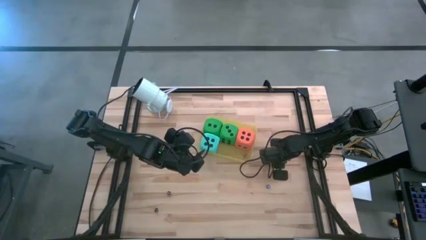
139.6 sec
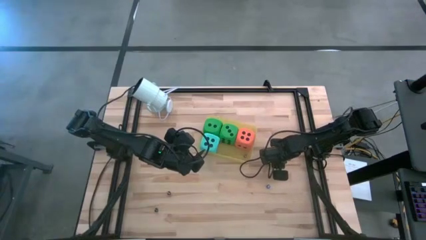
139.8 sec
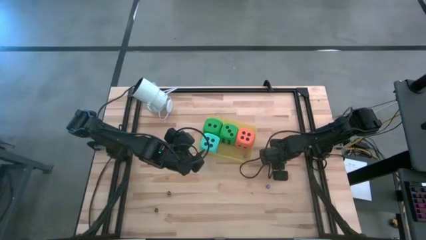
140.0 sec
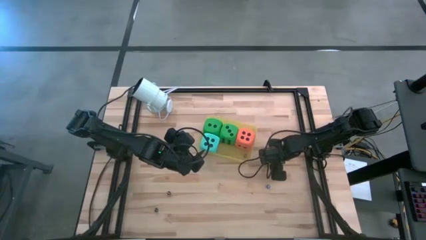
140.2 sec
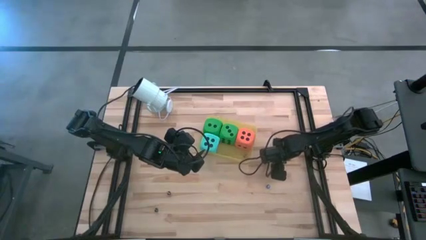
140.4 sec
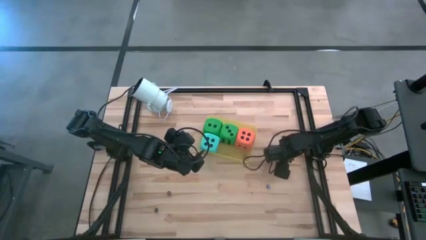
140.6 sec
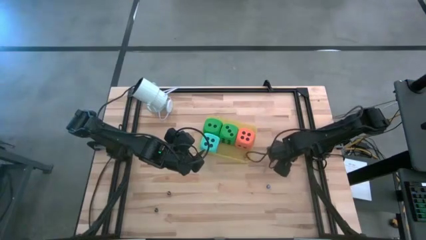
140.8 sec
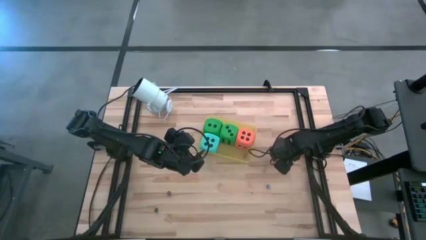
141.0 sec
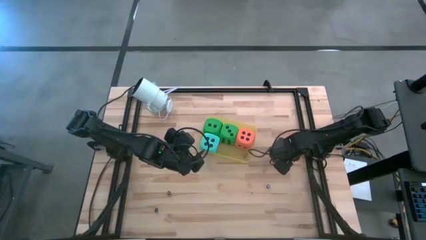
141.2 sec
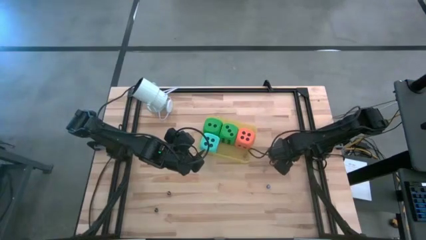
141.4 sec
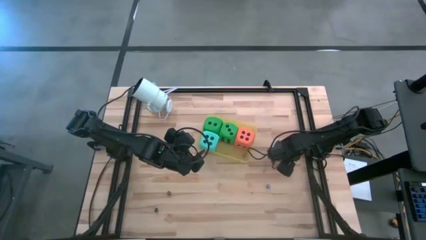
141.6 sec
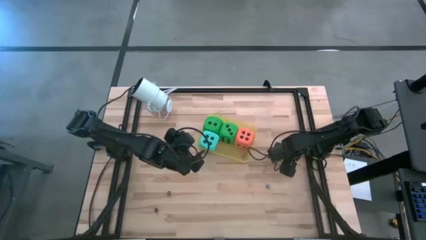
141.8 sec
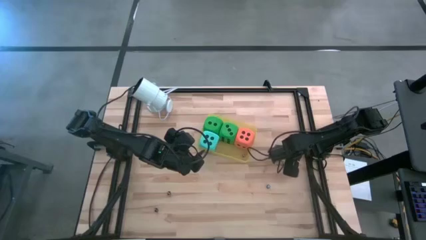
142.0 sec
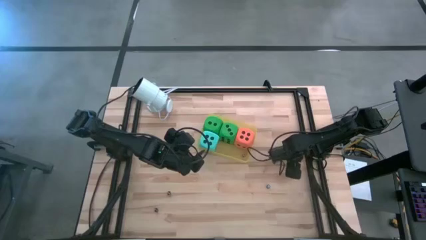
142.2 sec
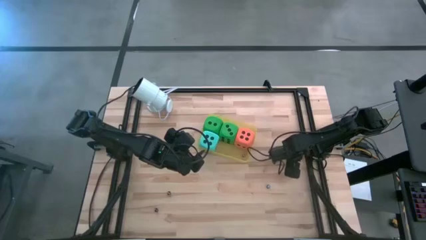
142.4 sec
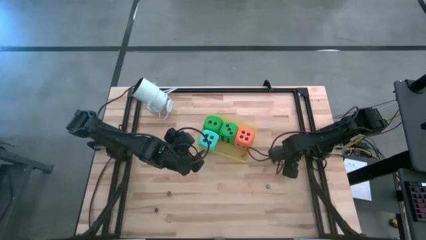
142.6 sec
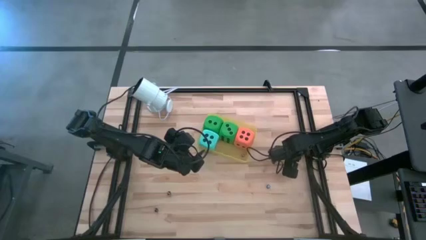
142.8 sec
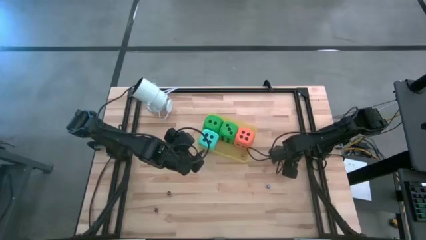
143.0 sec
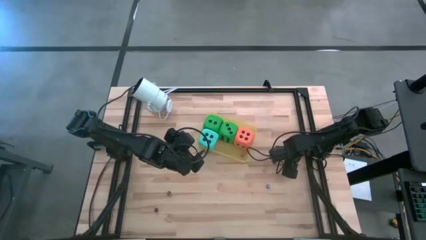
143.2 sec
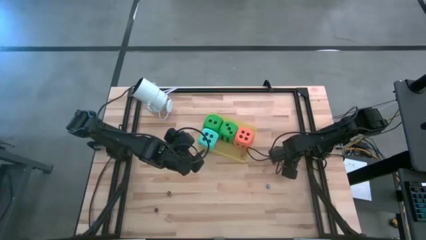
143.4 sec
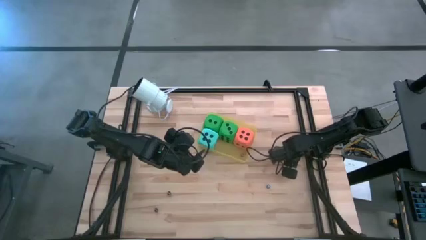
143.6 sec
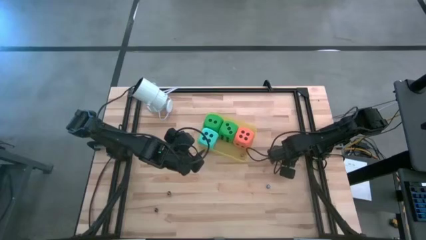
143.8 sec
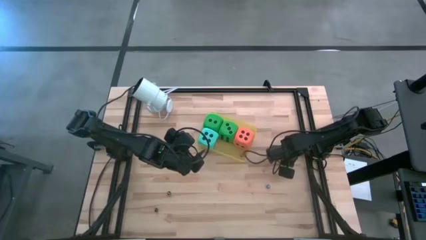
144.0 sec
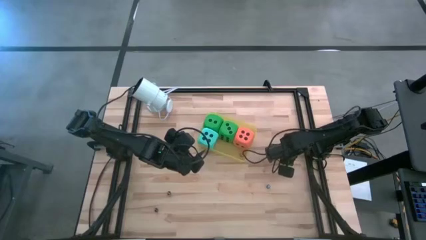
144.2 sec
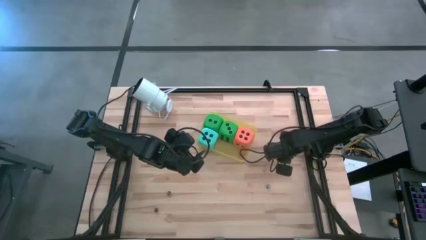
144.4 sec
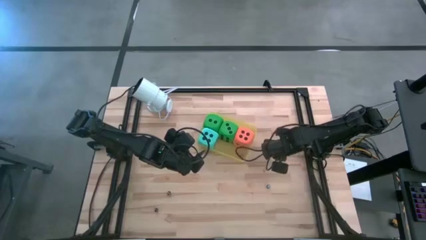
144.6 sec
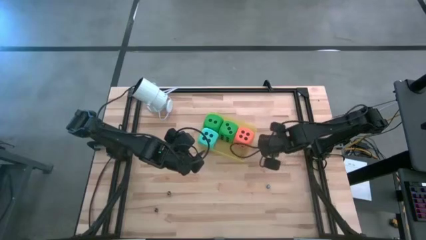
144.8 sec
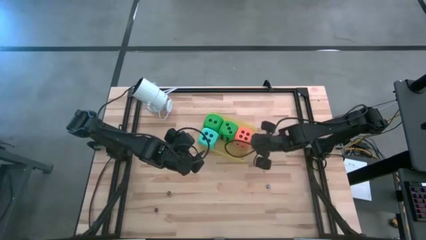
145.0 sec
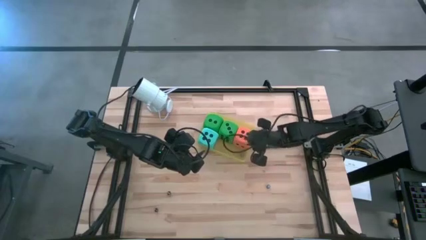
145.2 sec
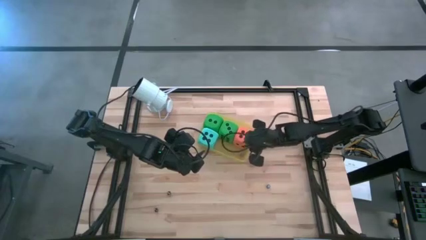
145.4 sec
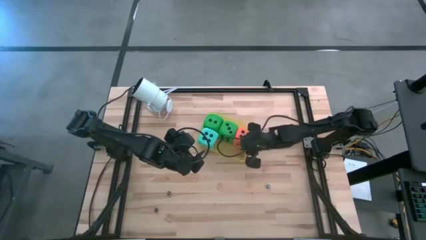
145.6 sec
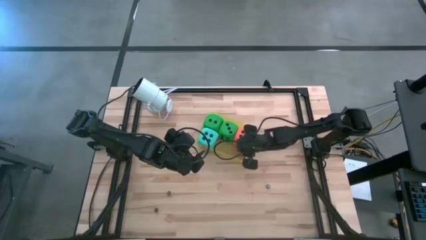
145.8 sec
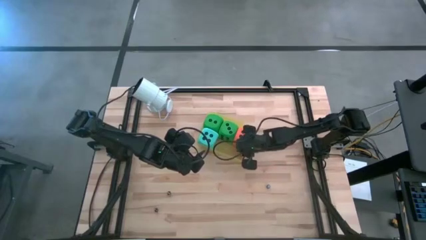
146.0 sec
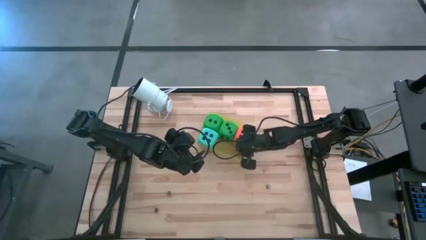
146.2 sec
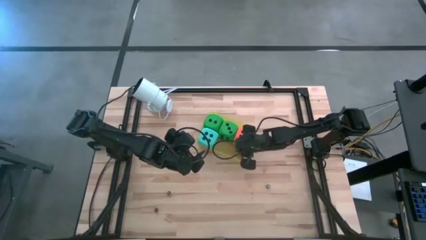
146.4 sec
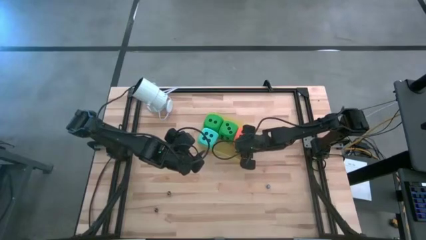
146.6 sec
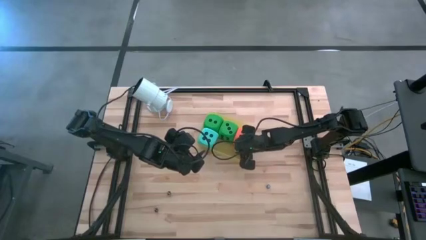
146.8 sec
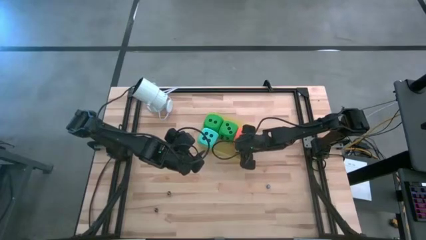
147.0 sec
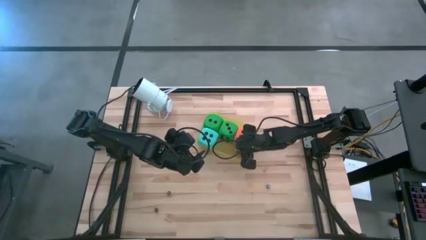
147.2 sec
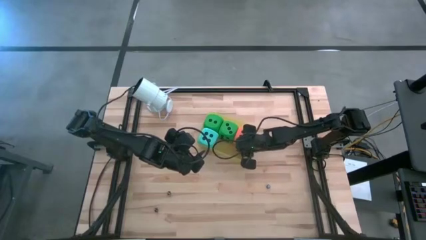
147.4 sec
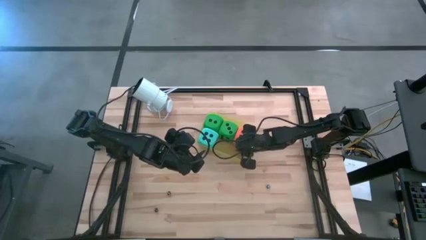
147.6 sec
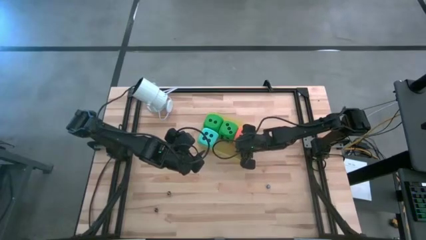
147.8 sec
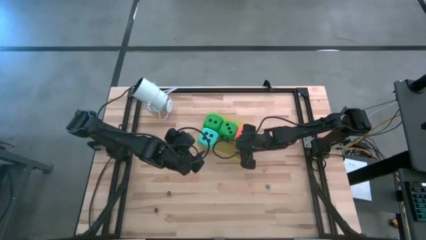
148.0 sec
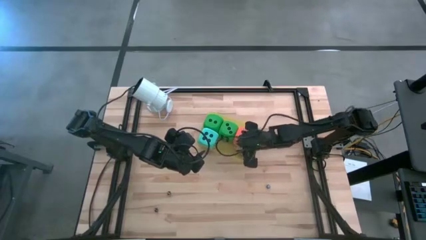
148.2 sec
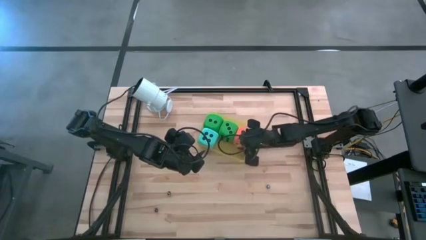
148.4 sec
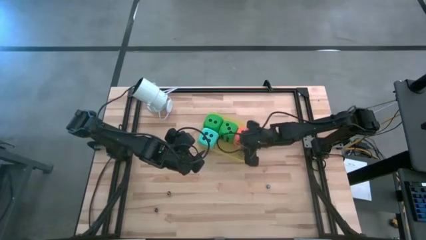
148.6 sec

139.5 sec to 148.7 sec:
Task: Pick & Place Dice
Put the small yellow dice into the yellow bin

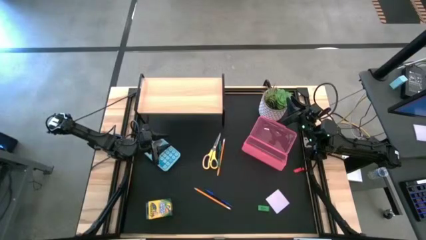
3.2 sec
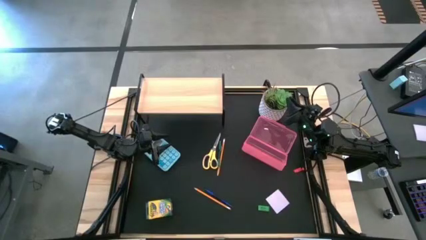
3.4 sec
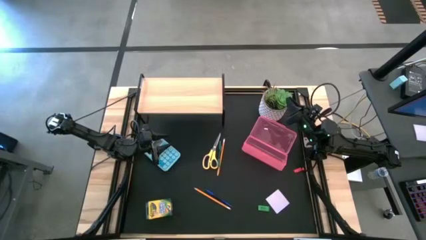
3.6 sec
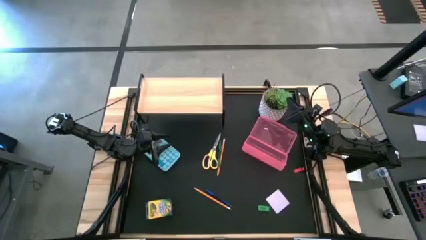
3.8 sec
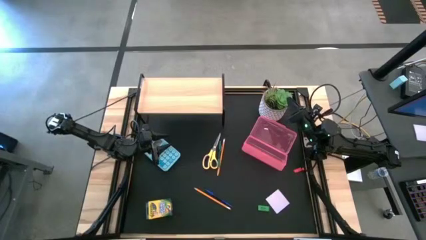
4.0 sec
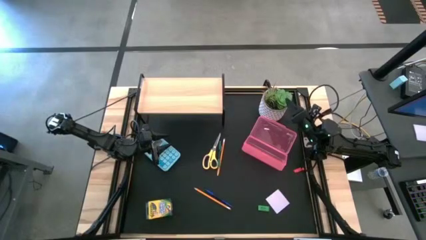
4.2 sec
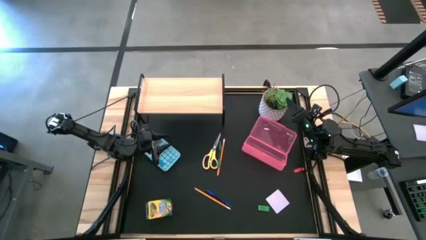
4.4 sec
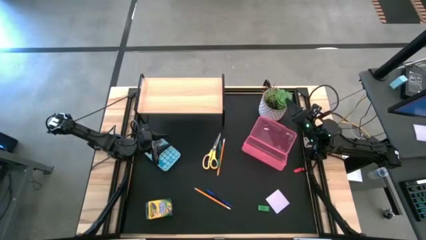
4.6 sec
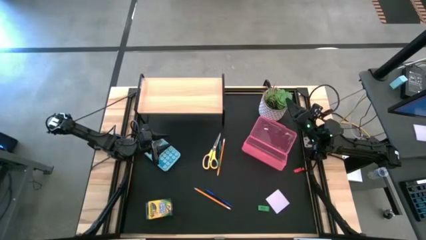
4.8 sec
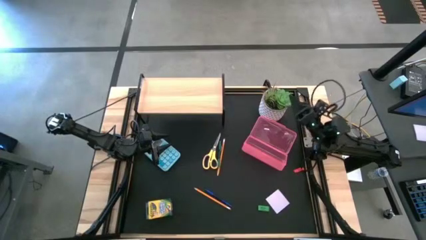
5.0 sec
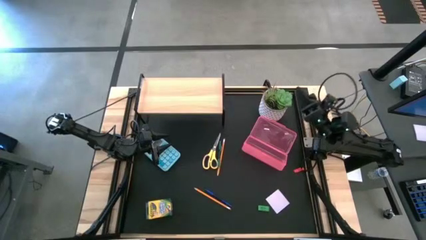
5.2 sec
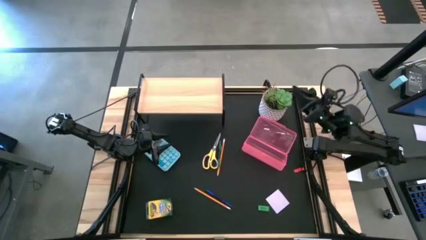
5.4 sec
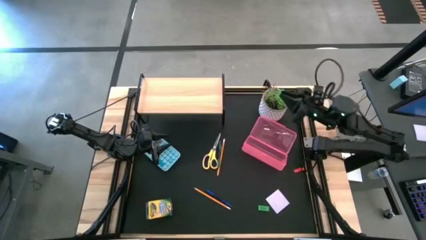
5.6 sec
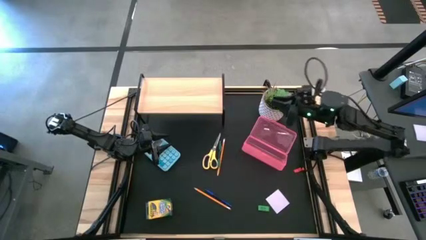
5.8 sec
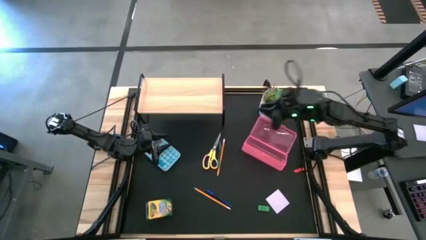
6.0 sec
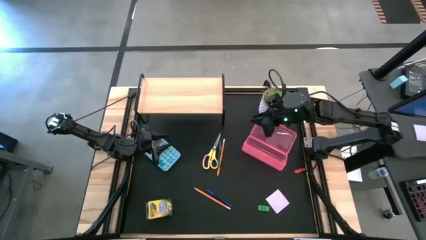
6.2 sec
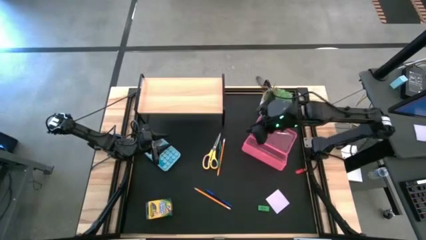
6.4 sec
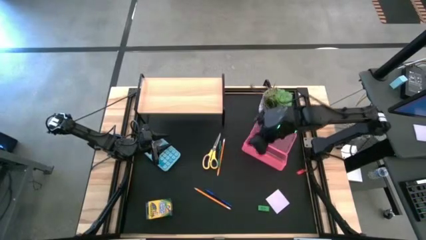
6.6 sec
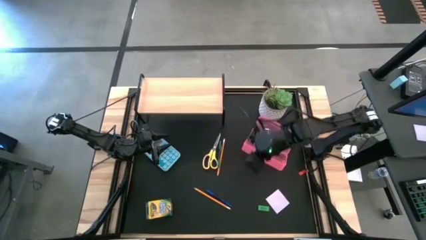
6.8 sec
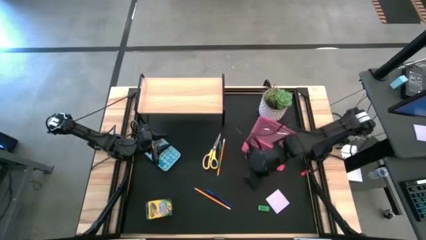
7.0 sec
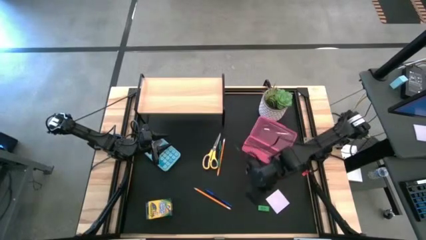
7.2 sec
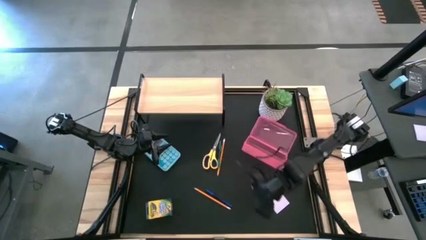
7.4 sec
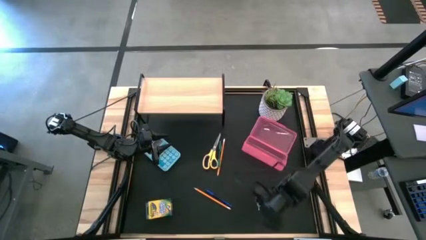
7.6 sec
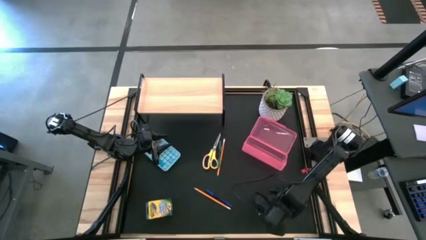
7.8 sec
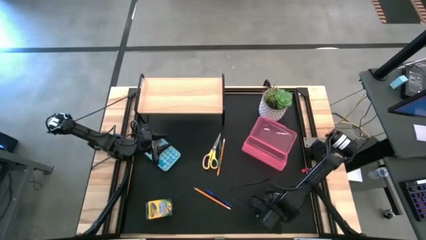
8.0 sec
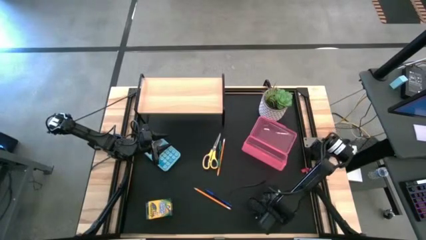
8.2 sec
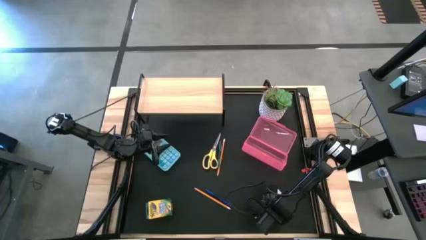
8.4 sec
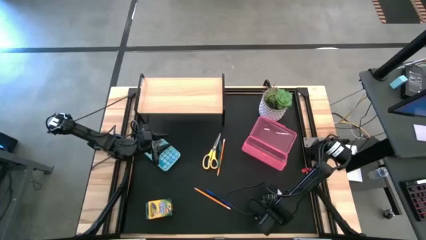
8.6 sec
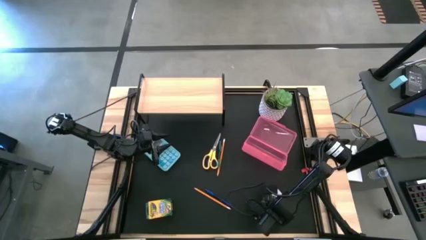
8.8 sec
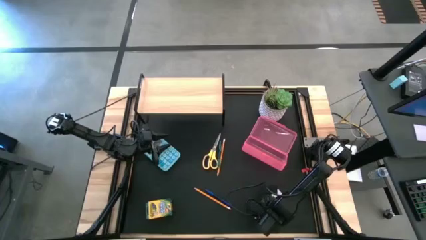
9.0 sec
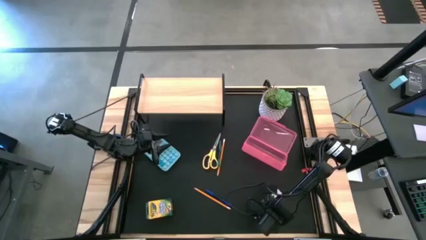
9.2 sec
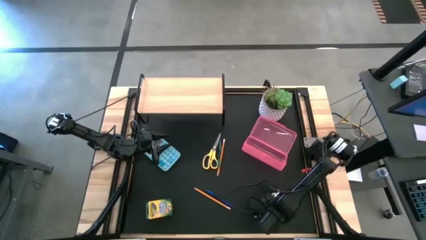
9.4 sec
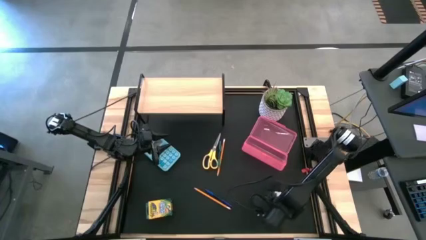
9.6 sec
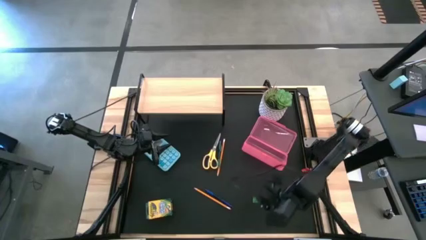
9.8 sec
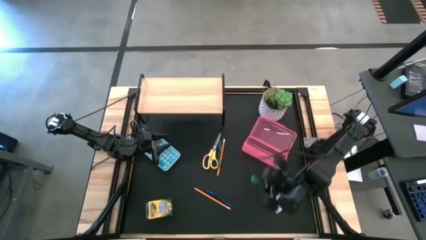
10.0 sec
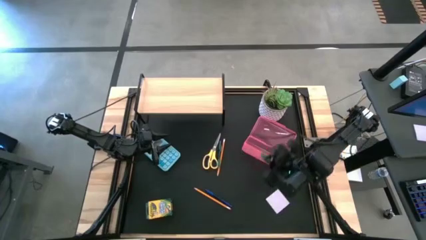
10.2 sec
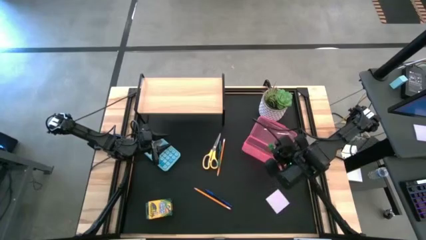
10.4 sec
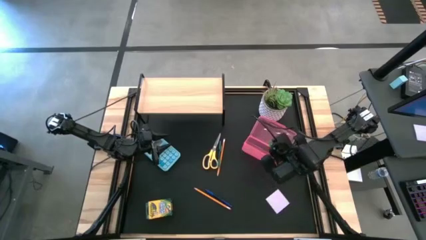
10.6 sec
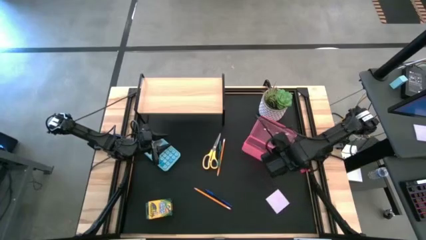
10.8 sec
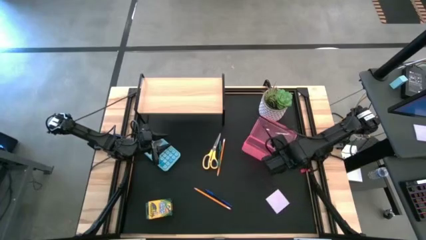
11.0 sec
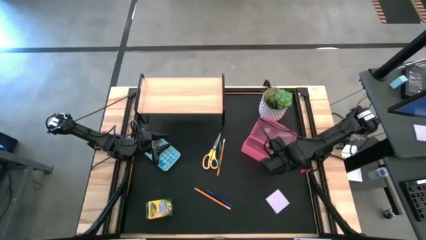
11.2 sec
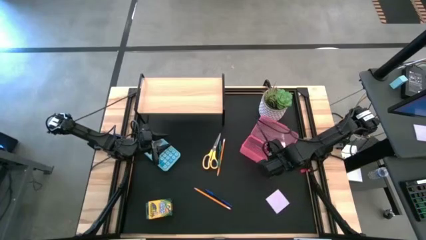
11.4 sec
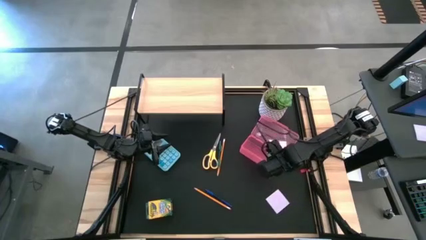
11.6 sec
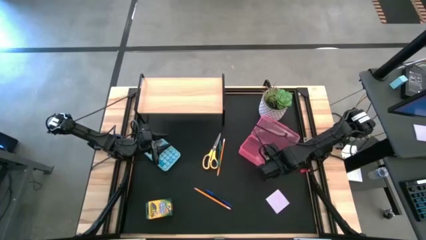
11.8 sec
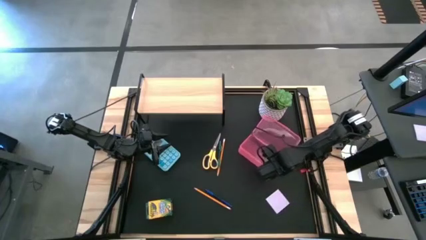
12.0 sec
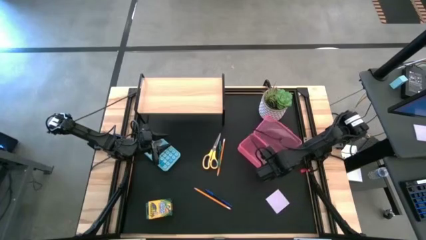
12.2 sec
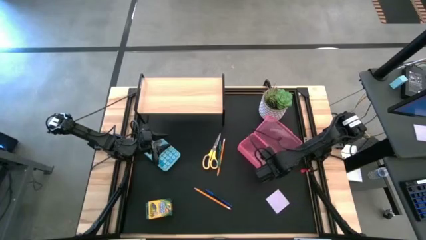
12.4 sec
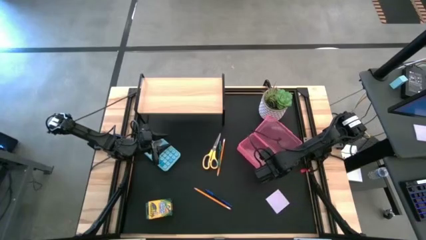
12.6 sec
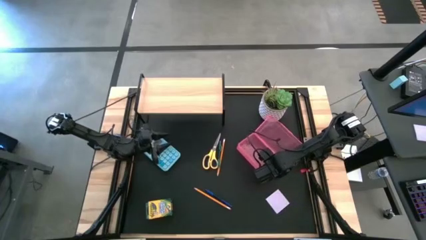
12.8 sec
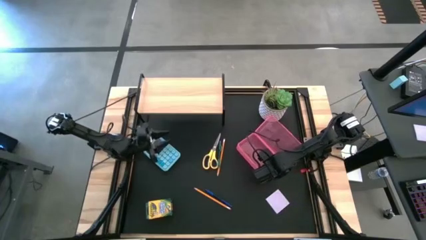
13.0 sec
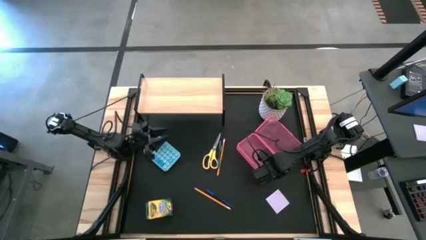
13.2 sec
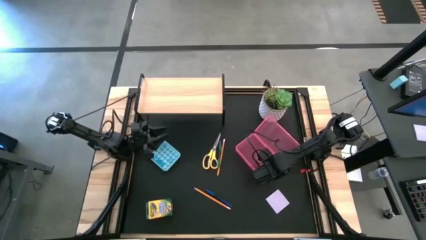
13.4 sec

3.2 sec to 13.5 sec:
Task: Pack school essentials
Put the green eraser into the pink supply box
